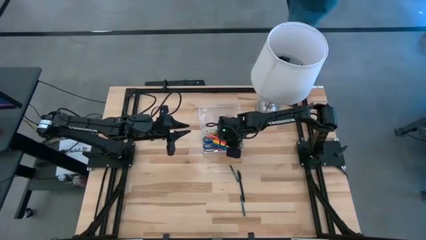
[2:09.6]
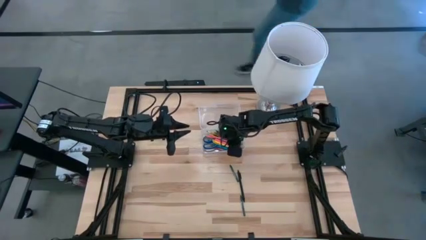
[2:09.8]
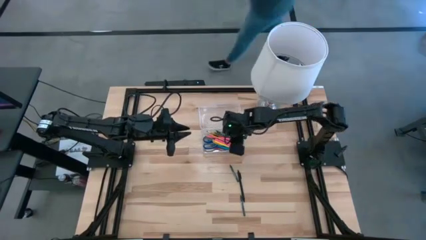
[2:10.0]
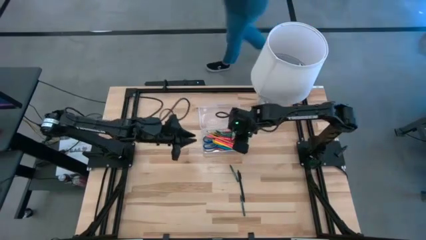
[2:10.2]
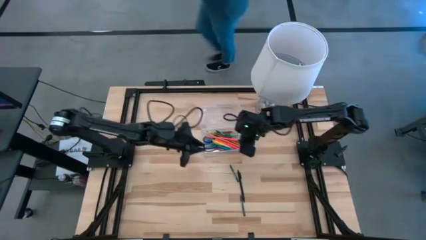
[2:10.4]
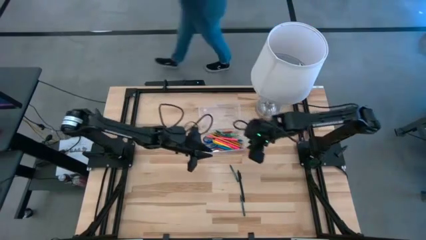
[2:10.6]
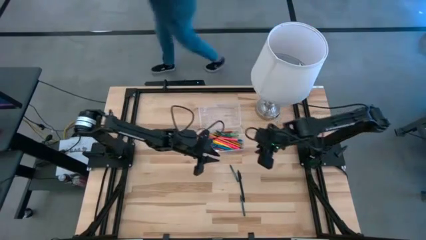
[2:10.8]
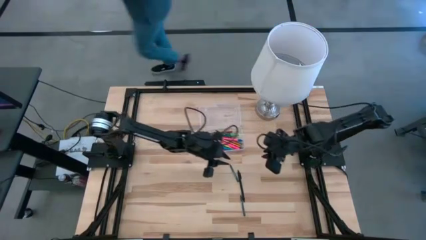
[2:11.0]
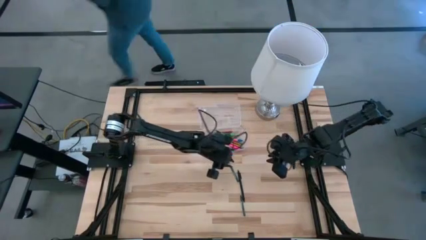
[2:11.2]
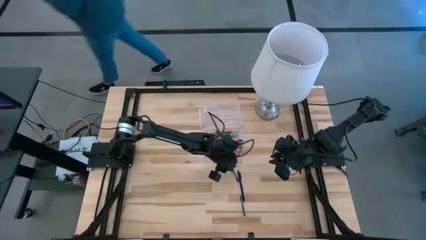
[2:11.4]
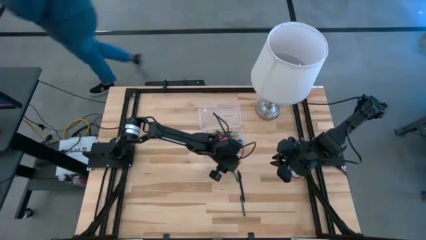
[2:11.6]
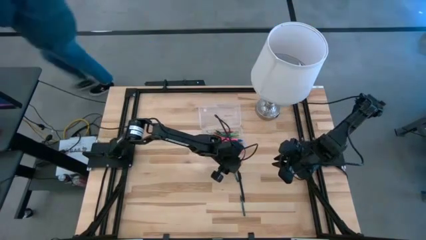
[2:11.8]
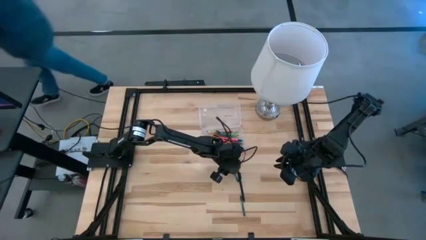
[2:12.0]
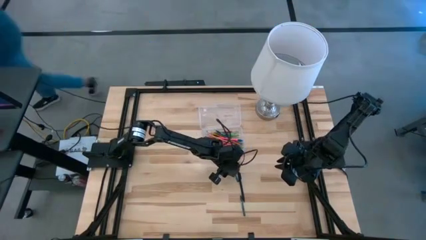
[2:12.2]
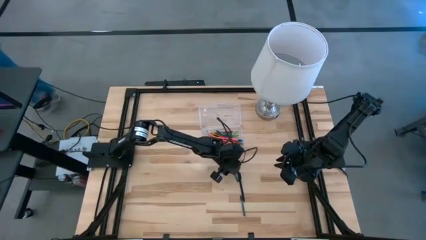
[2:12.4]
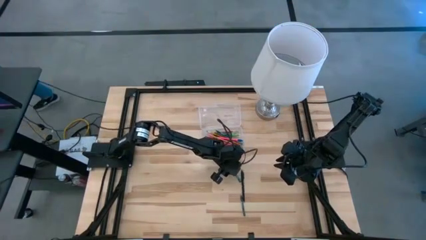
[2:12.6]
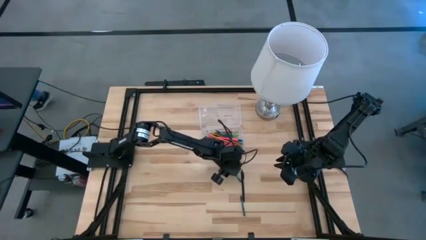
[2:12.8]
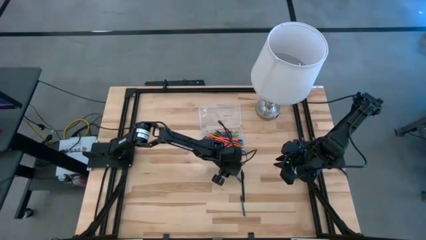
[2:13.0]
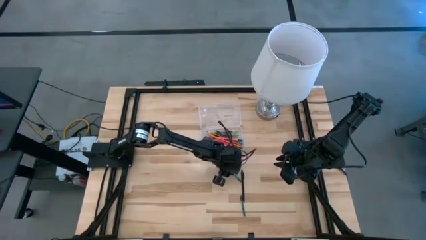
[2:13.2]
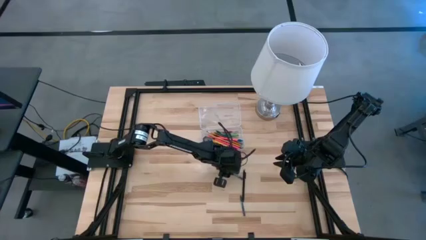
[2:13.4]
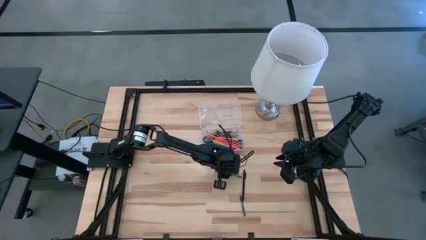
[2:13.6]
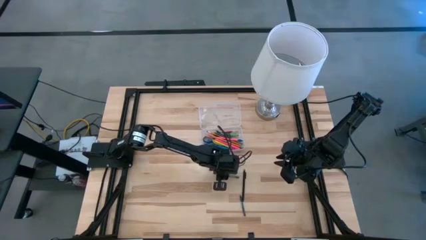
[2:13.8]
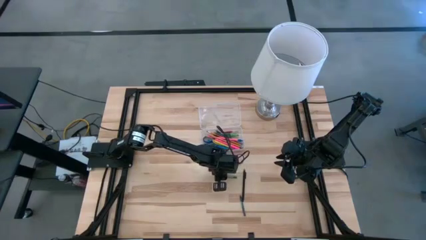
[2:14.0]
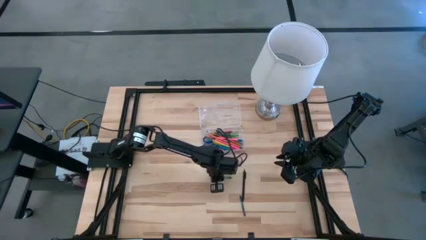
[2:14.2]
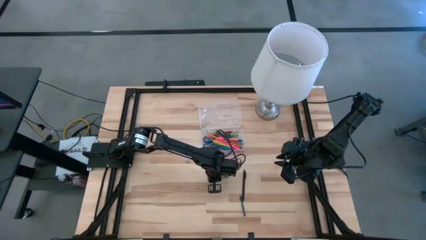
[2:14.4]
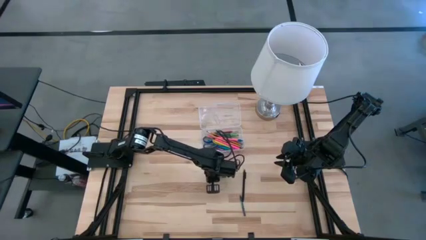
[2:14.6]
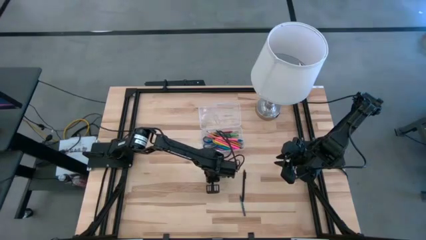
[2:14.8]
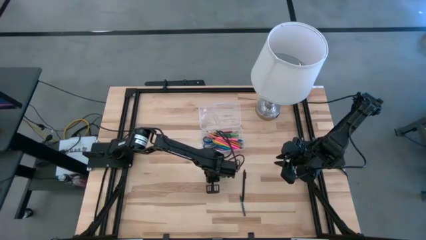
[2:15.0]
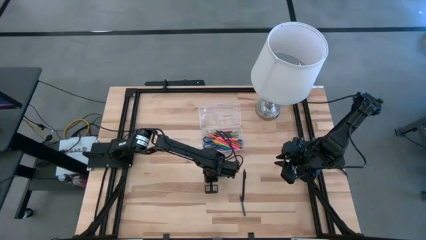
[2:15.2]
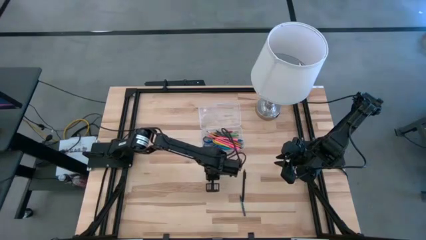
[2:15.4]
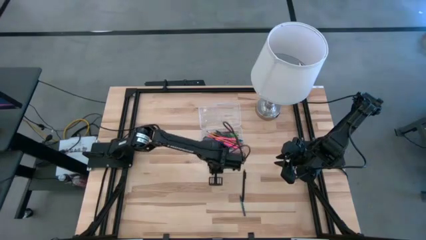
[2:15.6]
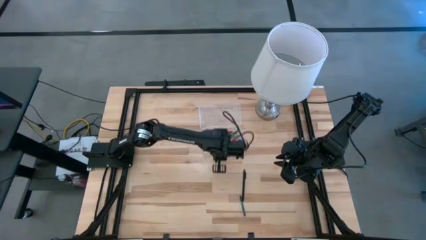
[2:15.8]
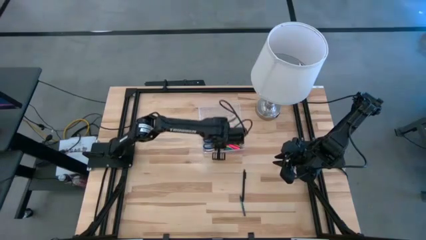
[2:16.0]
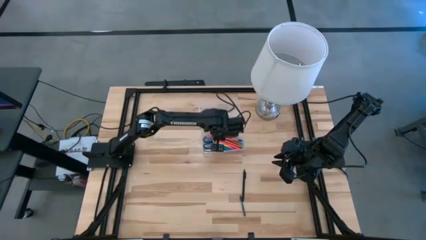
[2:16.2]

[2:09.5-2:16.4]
Task: Pick & place school supplies into a supply box
Put the green crayon into the transparent supply box

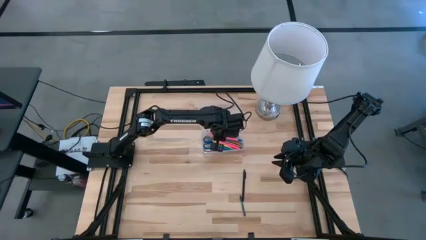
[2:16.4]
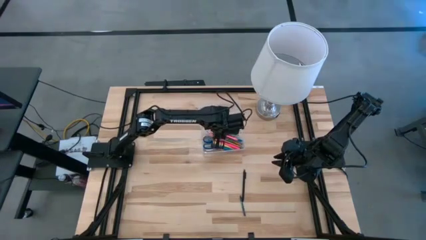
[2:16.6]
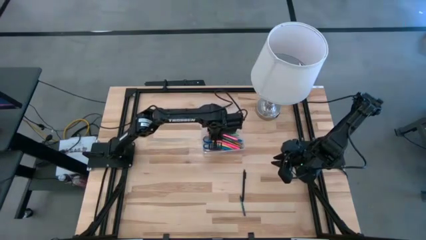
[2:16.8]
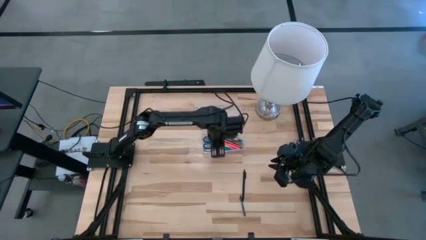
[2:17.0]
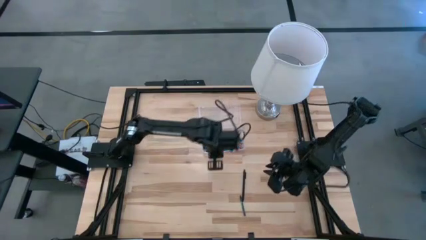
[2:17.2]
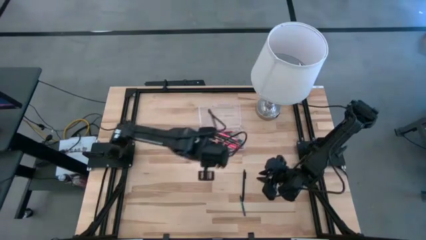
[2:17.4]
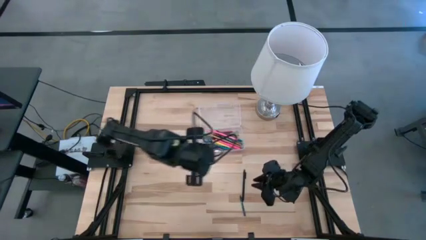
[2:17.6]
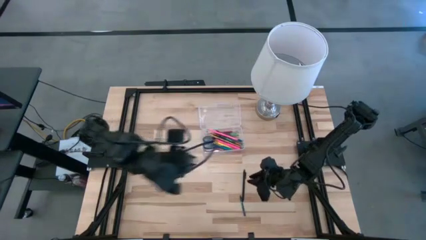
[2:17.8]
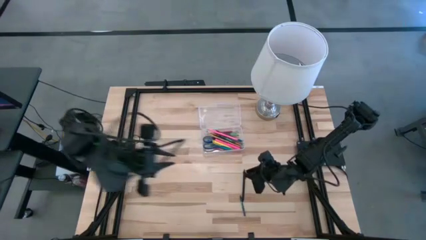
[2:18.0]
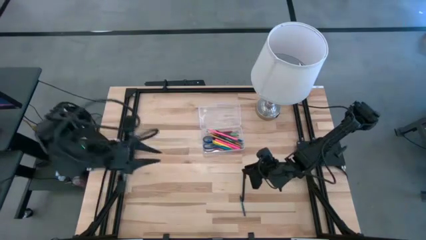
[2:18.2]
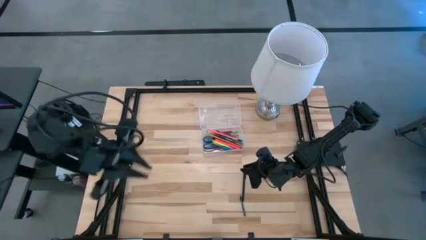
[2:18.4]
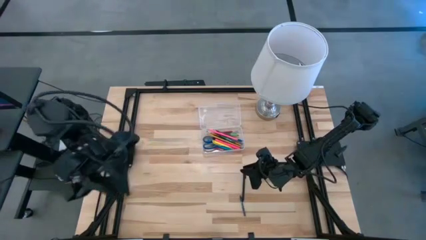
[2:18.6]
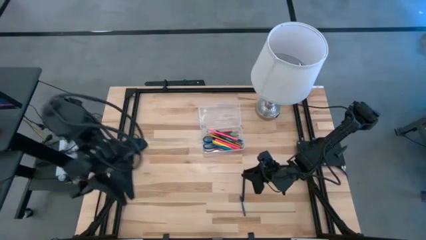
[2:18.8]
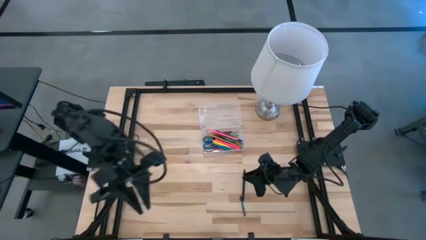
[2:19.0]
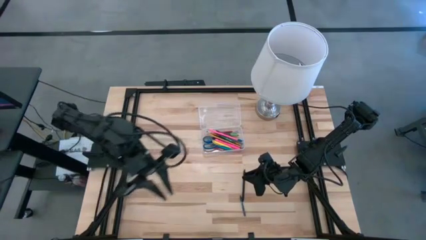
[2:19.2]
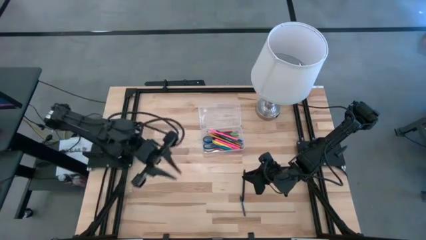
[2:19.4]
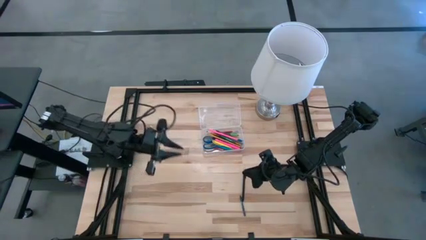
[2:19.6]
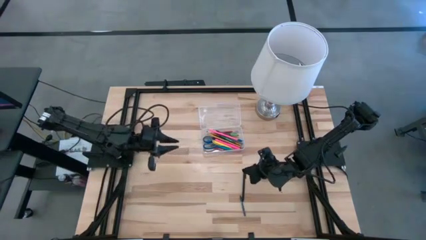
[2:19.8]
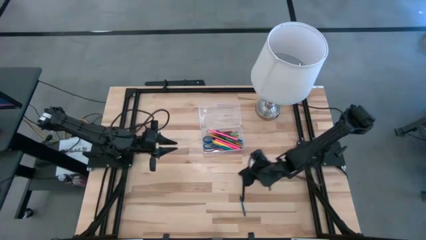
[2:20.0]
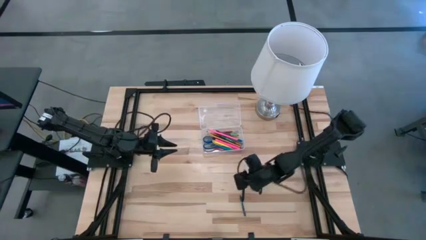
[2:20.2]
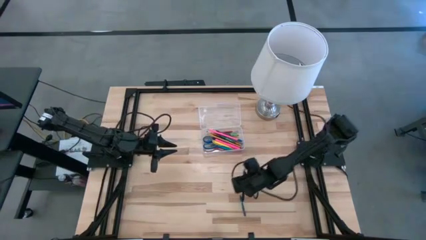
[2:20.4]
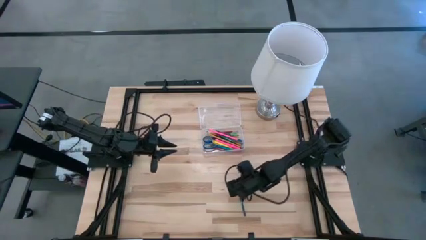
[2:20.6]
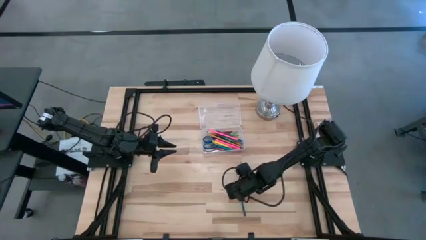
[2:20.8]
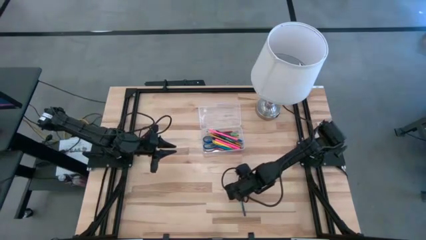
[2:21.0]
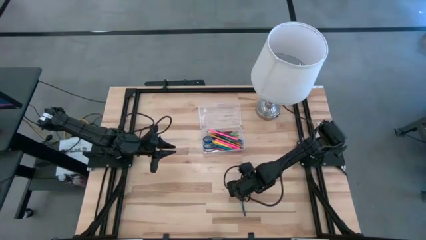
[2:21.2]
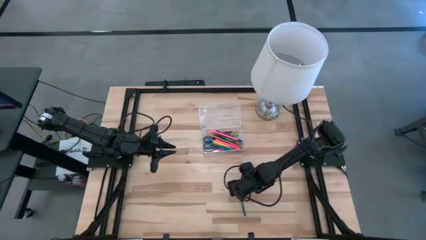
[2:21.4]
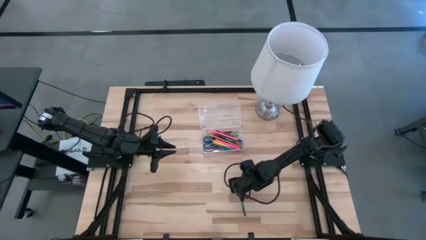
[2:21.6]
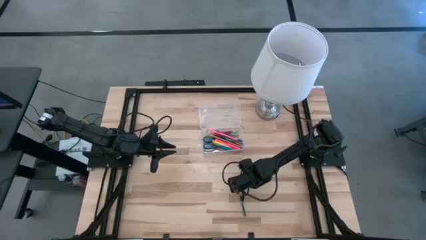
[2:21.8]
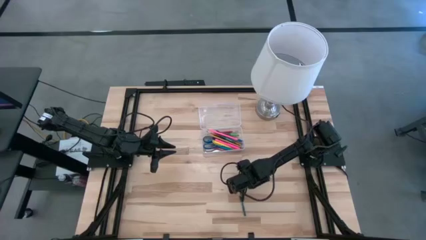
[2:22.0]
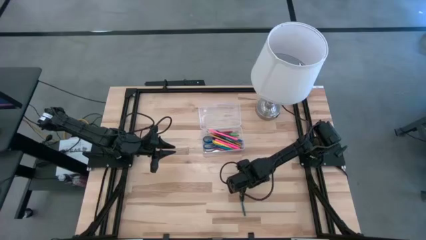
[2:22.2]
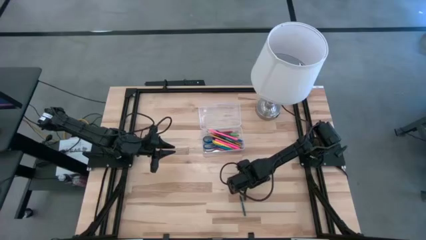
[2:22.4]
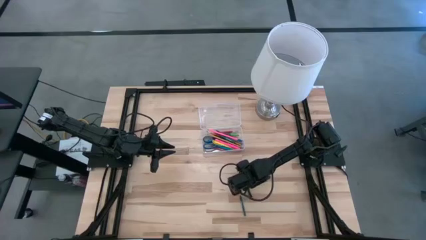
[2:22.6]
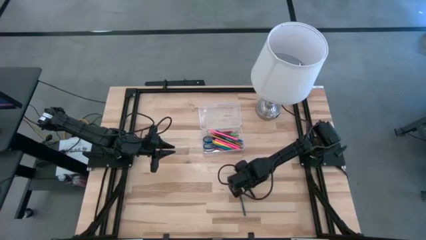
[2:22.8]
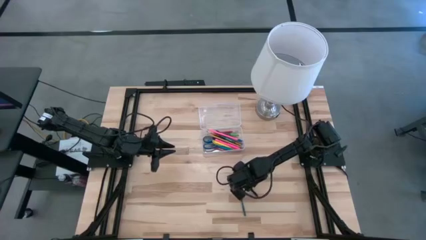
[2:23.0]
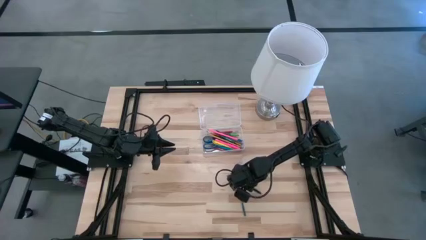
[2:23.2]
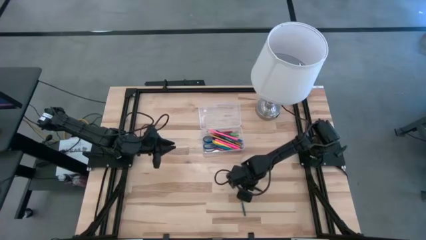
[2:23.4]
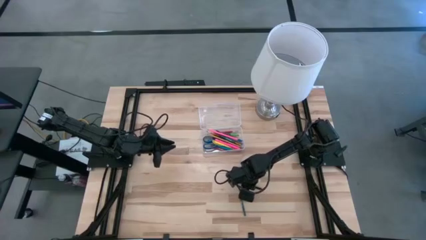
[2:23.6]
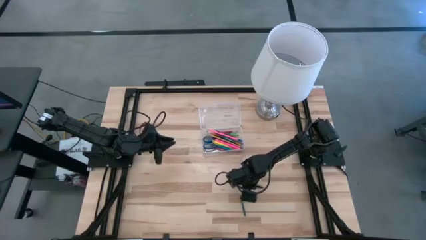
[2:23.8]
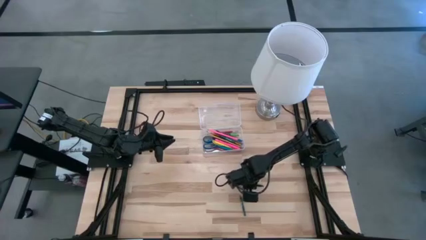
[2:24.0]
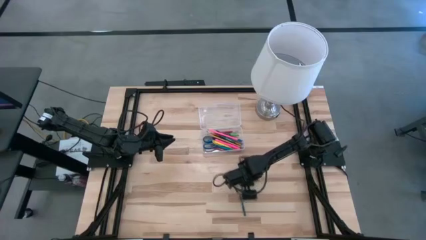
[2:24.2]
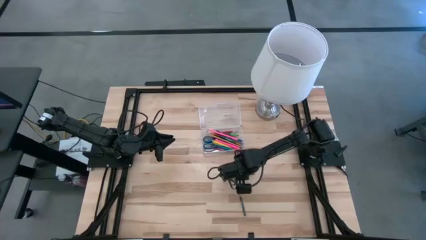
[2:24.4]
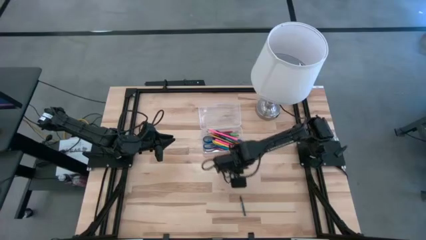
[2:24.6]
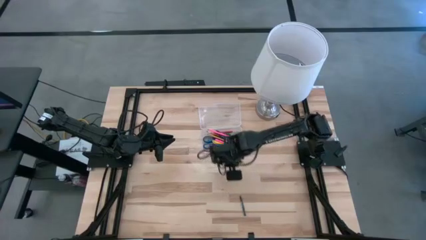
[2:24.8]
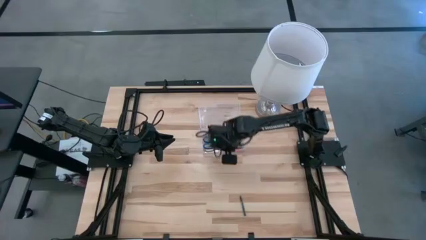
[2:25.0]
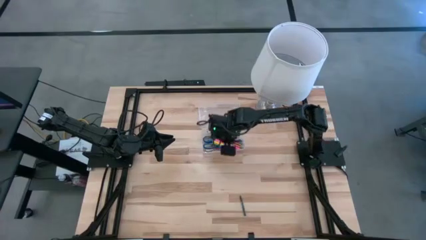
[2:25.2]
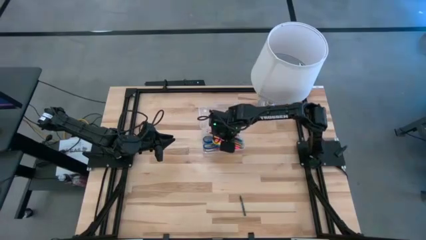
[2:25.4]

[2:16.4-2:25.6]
Put the black pen into the transparent supply box
